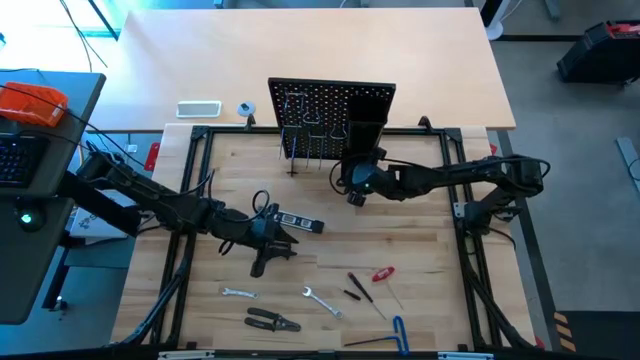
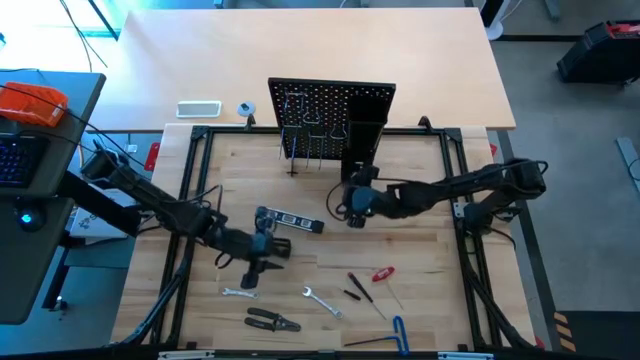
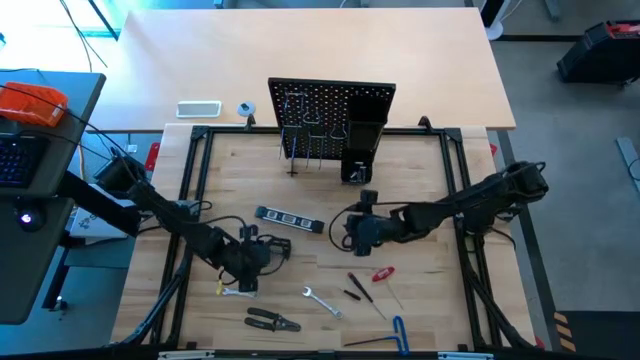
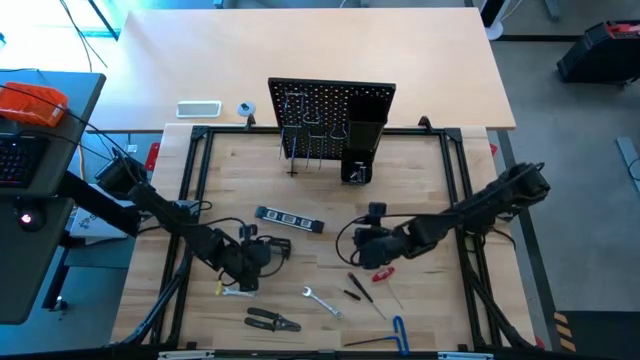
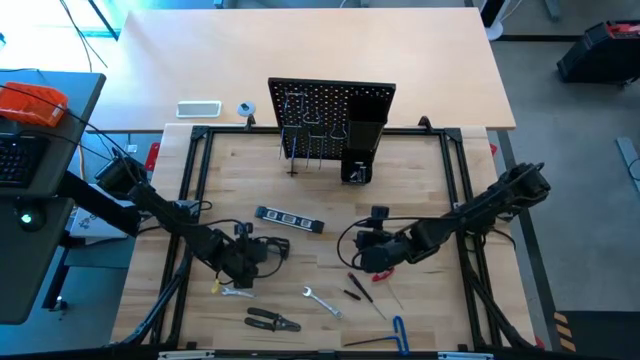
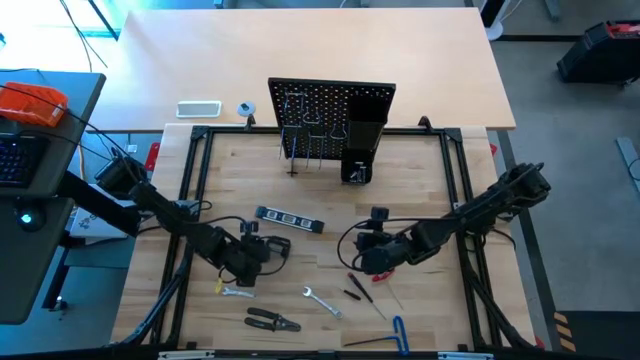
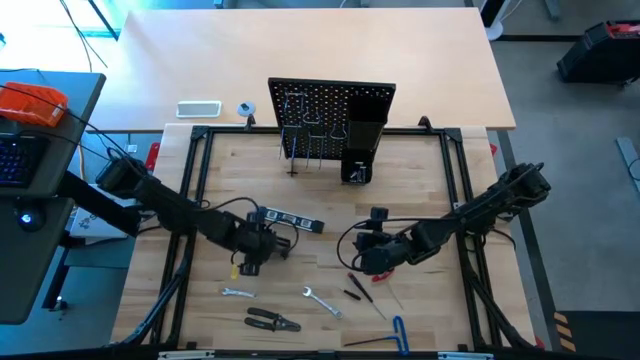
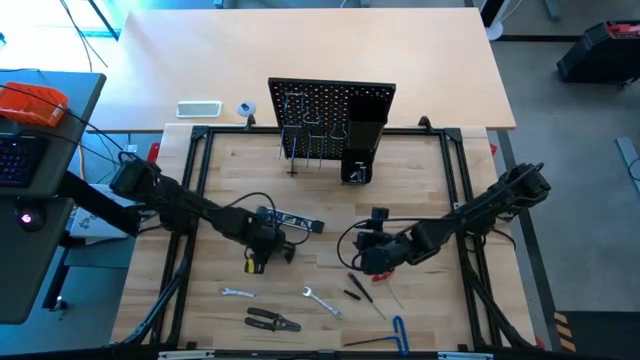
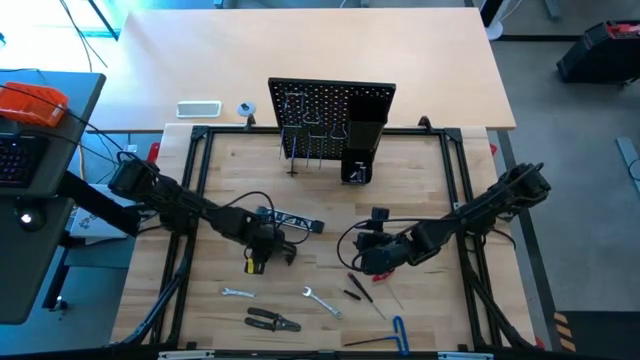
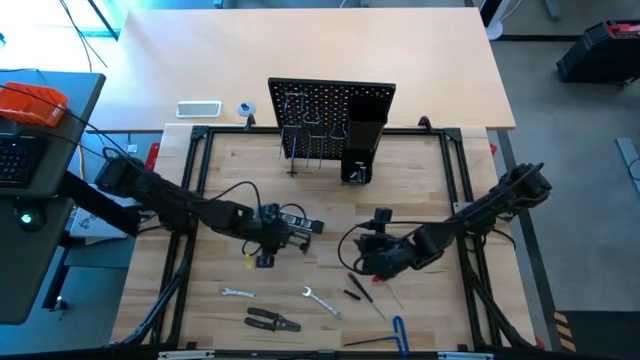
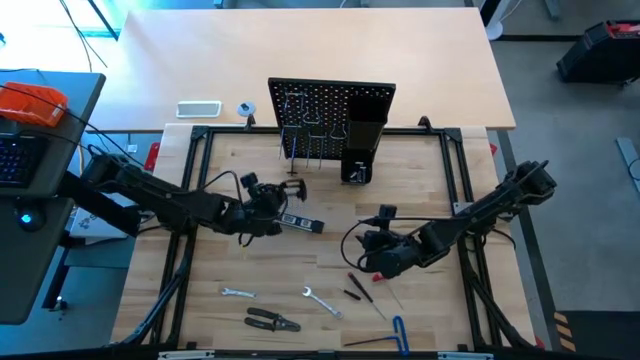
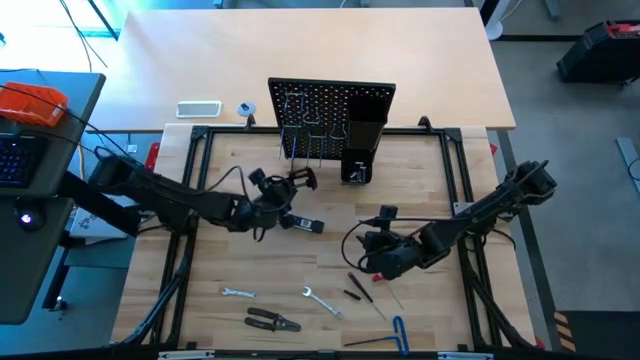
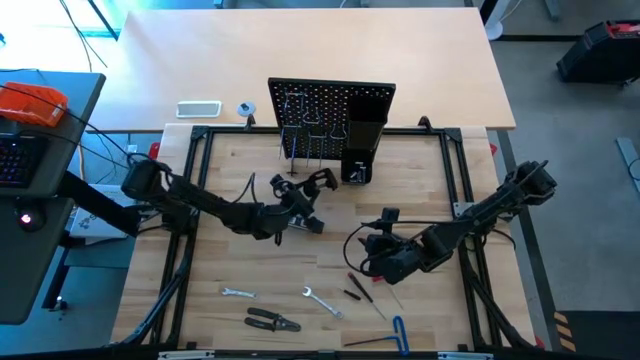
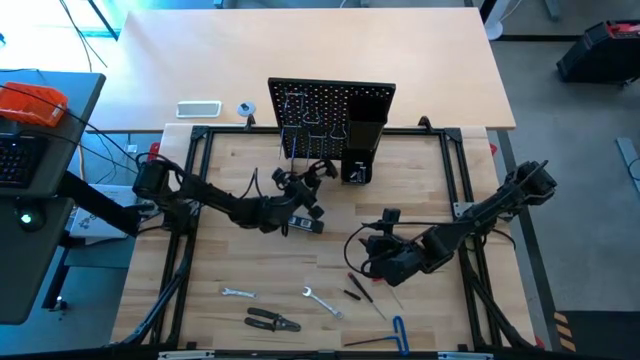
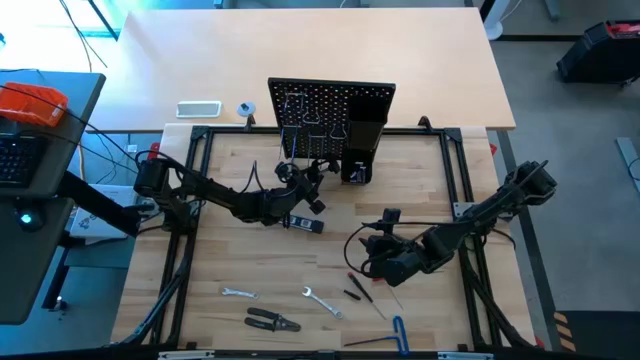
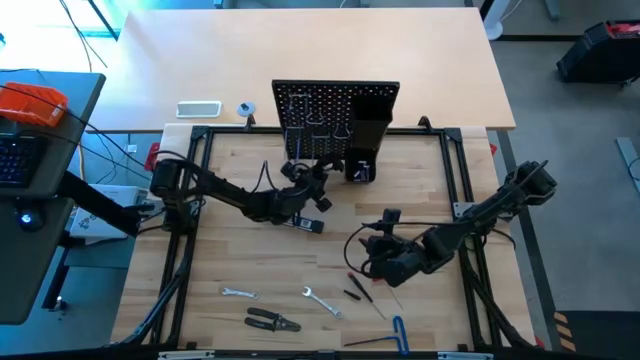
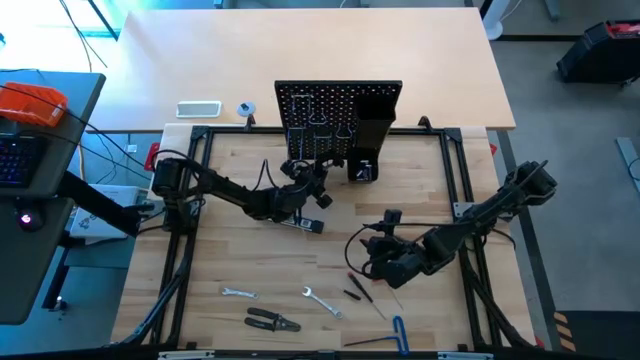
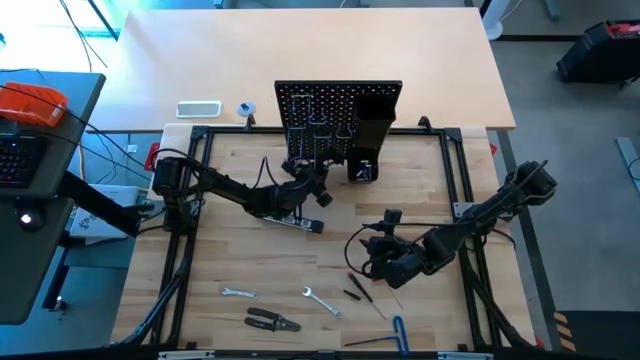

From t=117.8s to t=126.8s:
Task: Hang tools onto peg board
Hang the black clamp onto the peg board

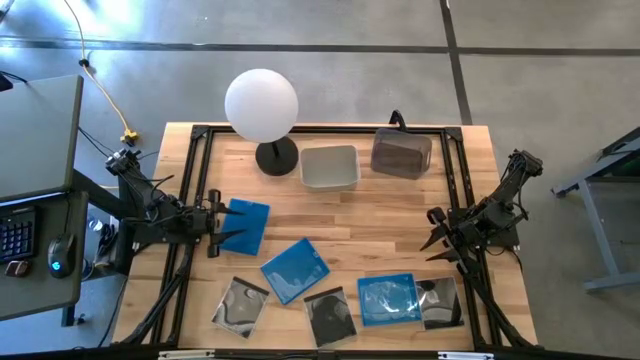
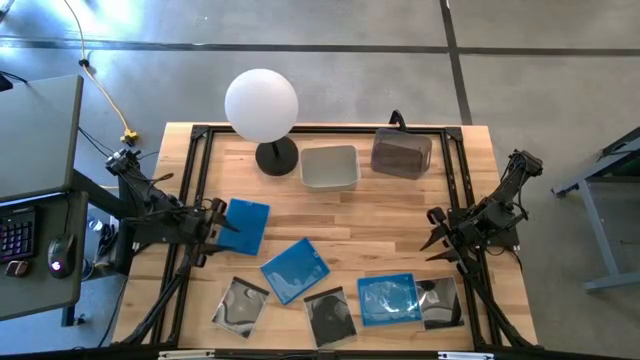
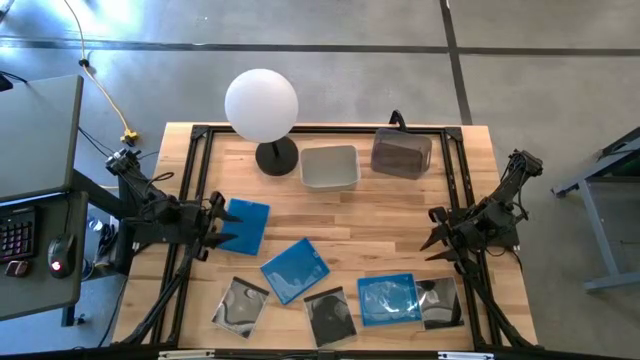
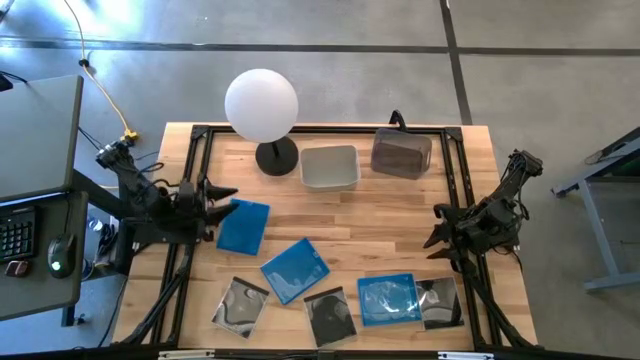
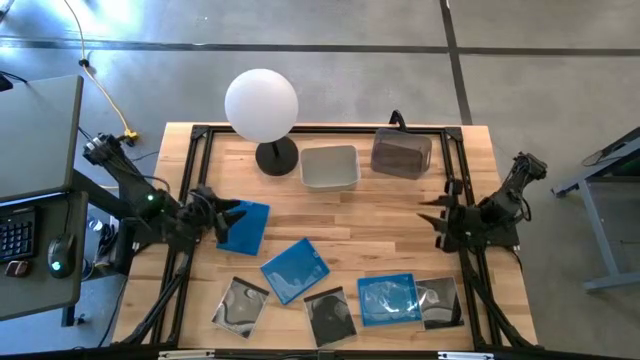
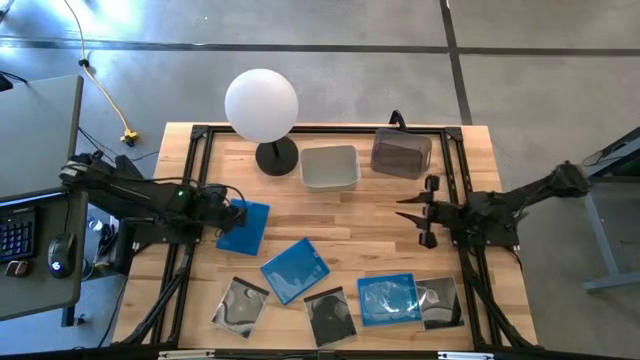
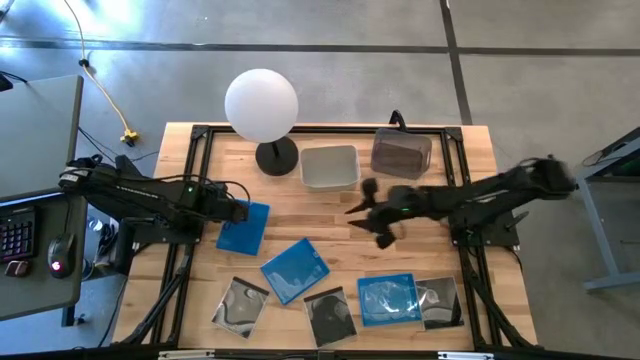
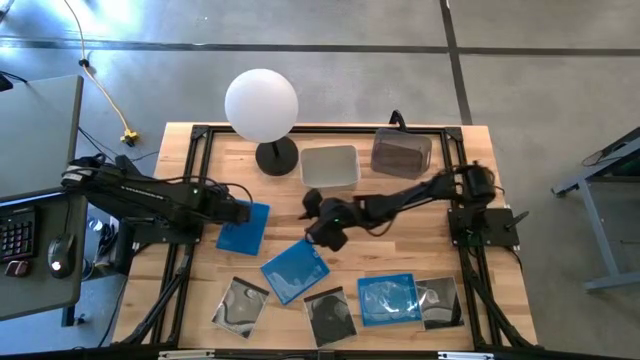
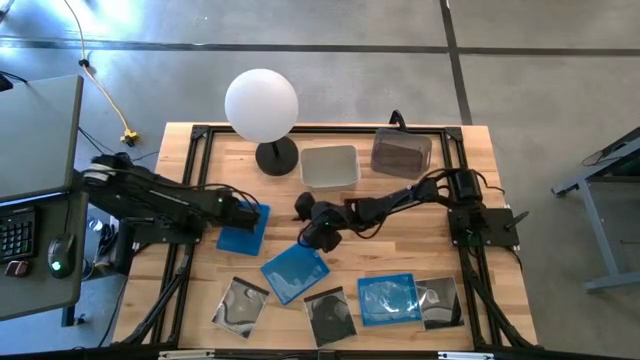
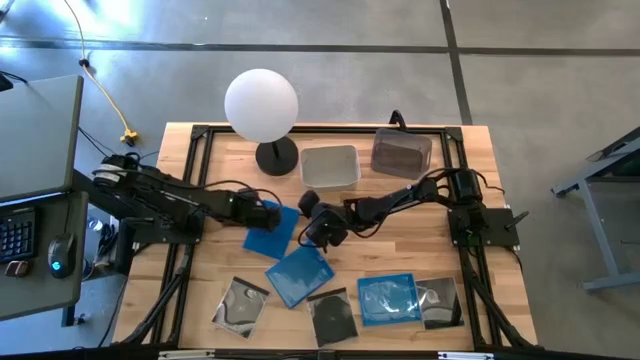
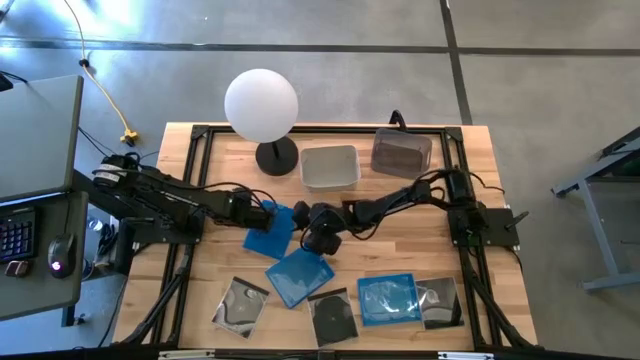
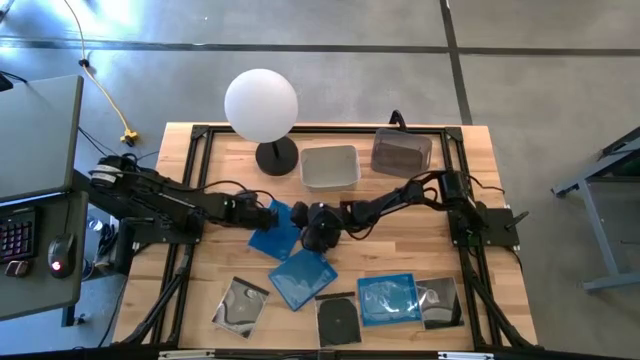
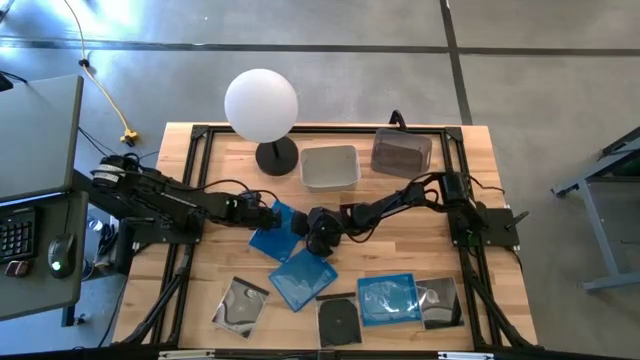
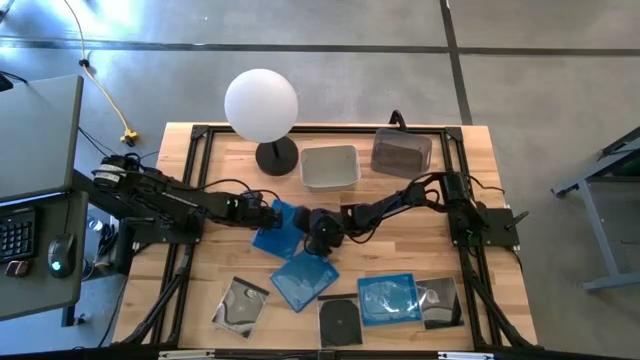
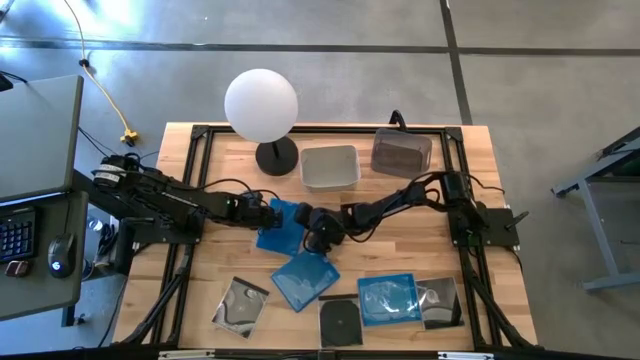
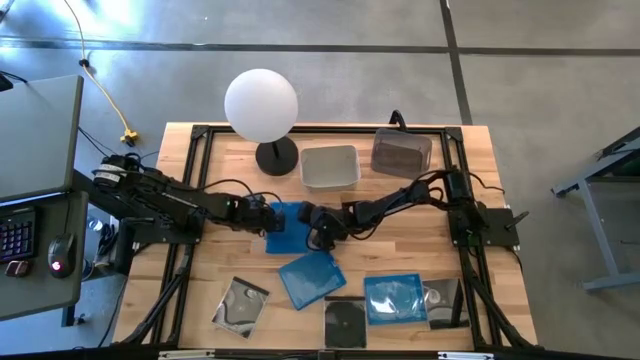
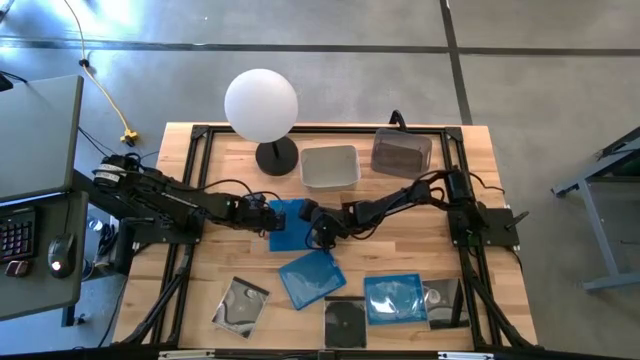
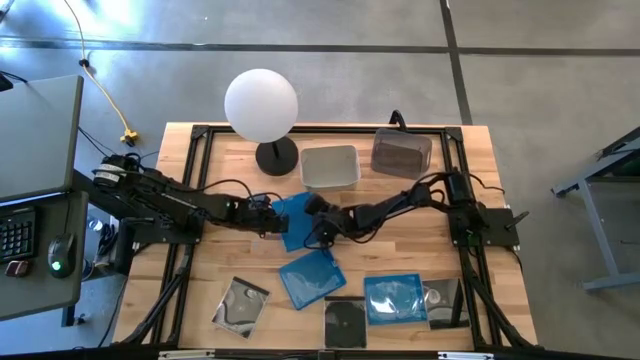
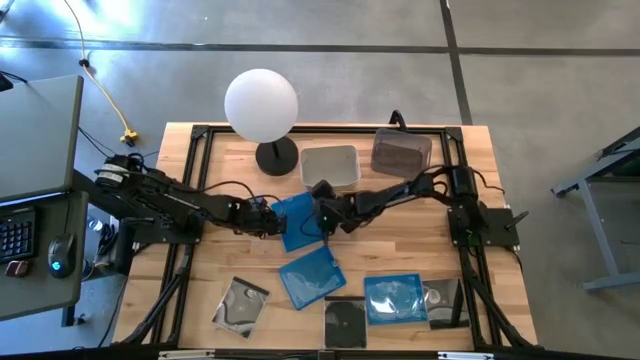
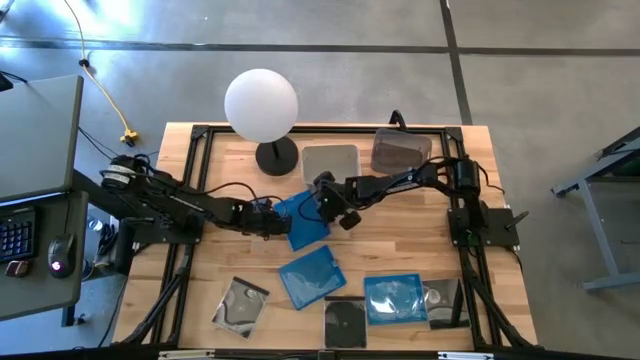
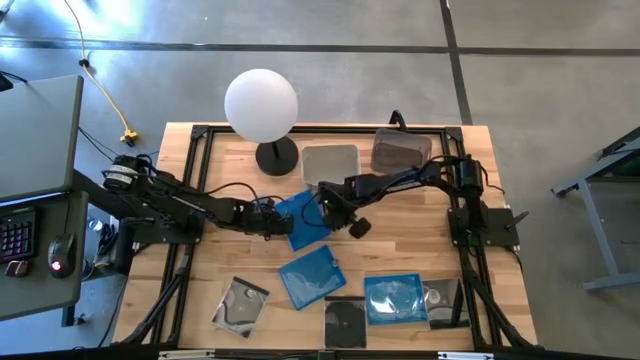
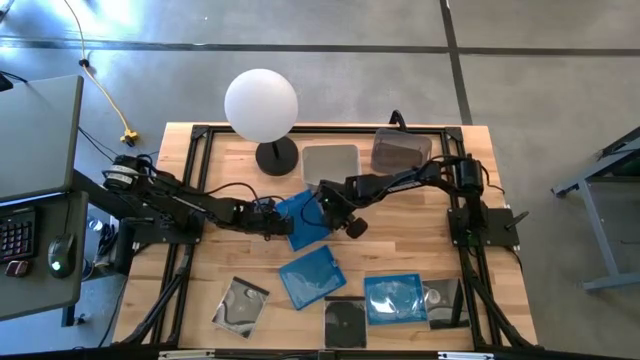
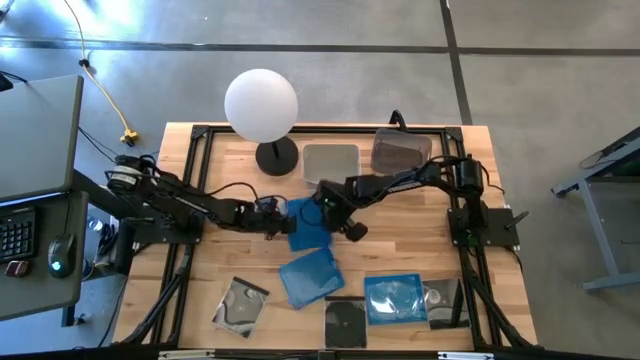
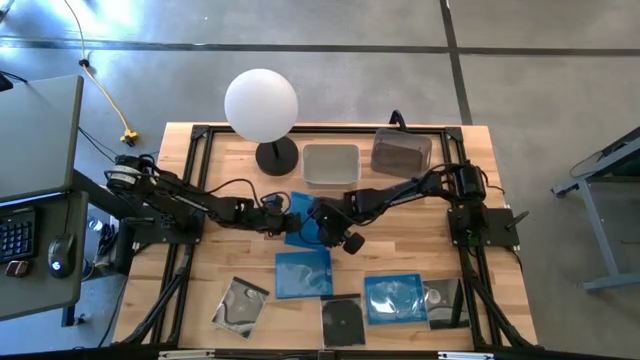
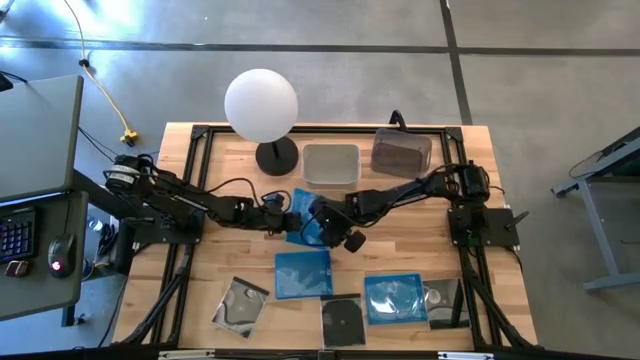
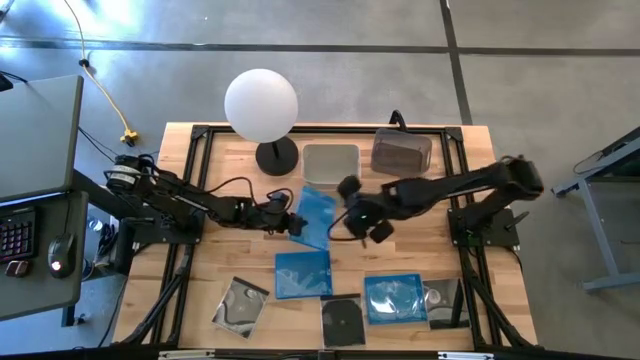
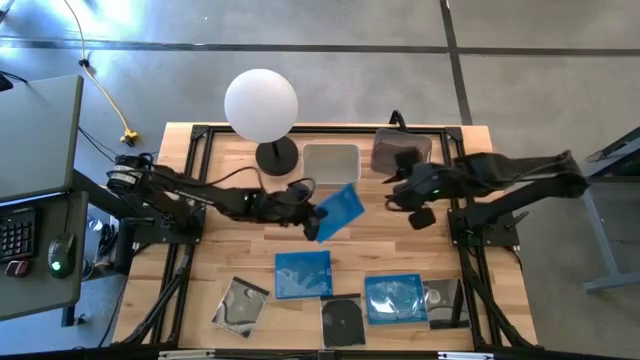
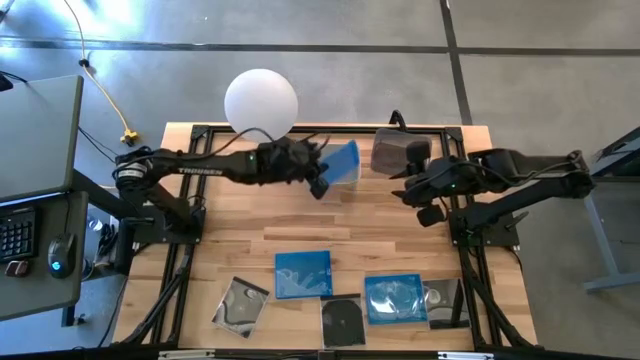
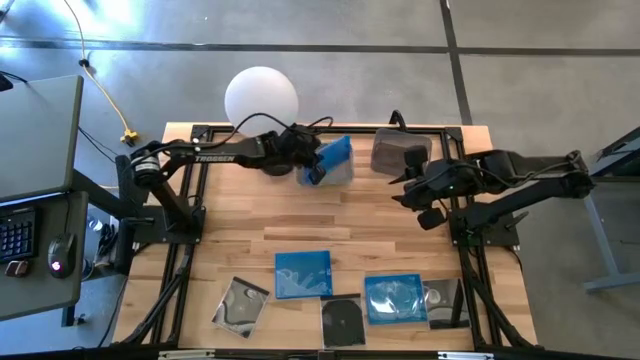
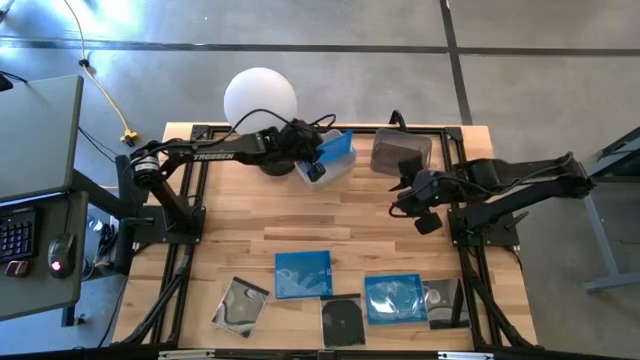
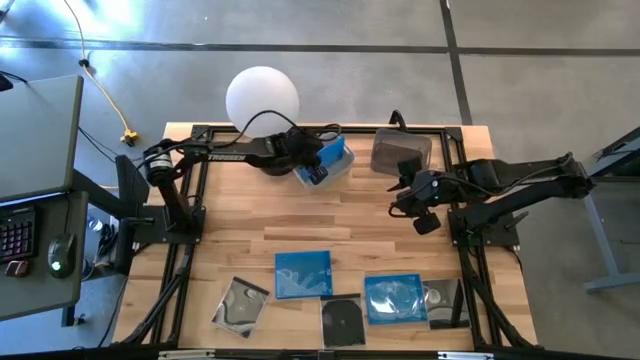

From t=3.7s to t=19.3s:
Task: Pick & place jewel cases by type
Put the top blue CD case into the gray bin
